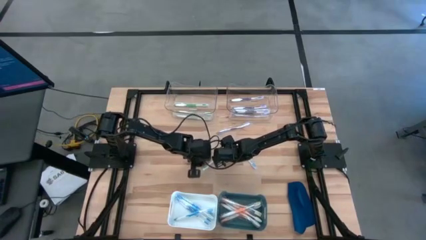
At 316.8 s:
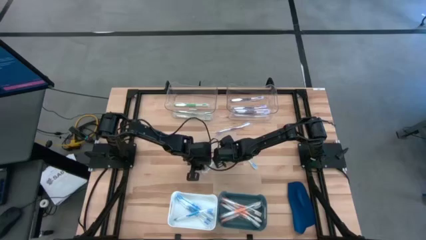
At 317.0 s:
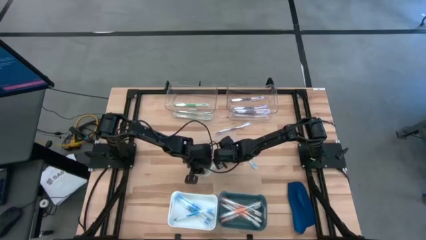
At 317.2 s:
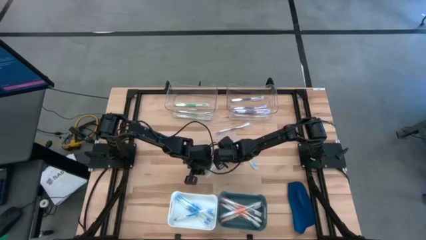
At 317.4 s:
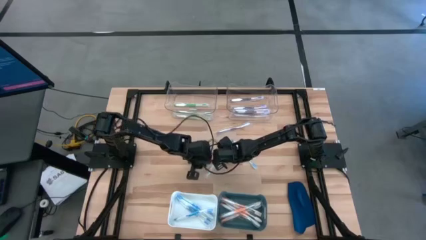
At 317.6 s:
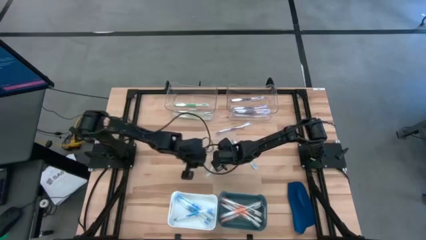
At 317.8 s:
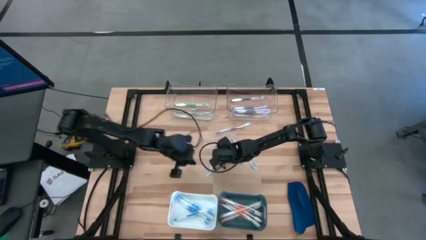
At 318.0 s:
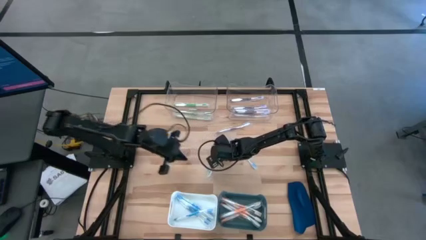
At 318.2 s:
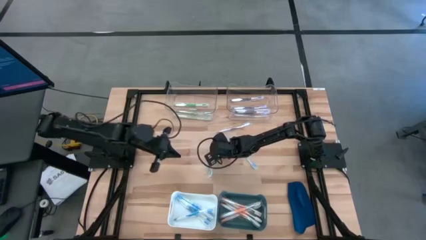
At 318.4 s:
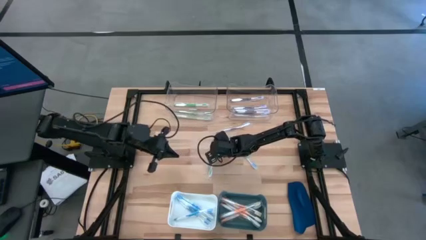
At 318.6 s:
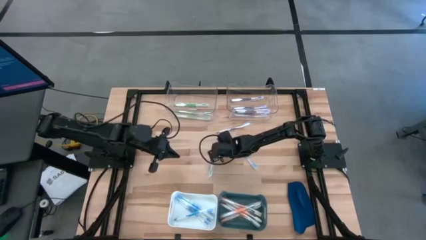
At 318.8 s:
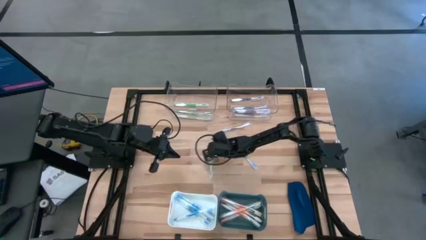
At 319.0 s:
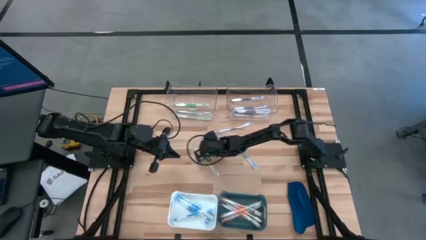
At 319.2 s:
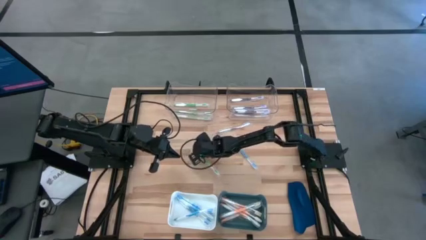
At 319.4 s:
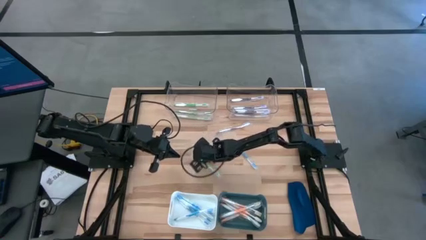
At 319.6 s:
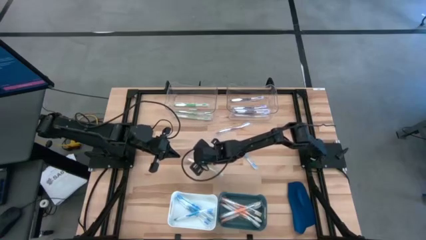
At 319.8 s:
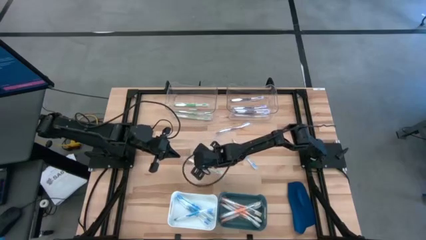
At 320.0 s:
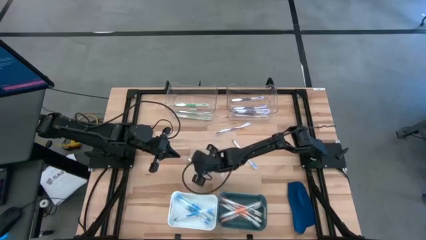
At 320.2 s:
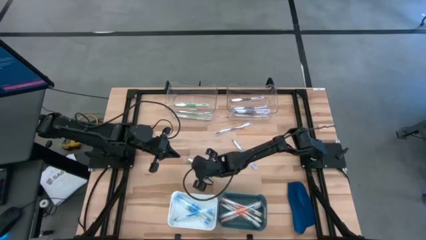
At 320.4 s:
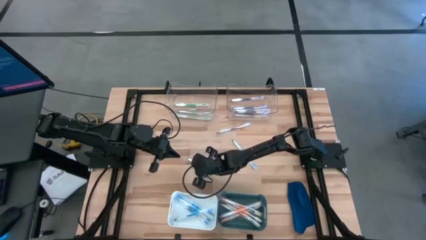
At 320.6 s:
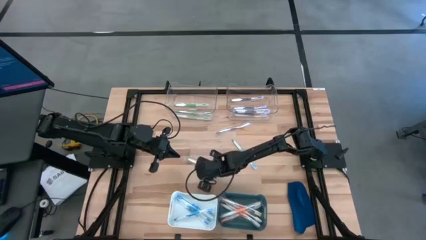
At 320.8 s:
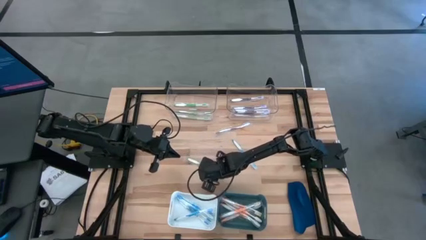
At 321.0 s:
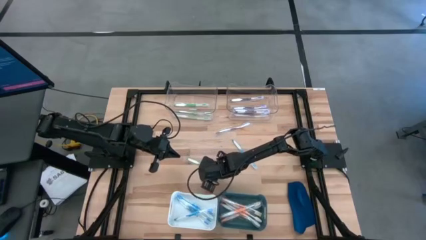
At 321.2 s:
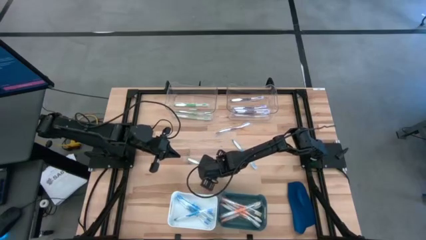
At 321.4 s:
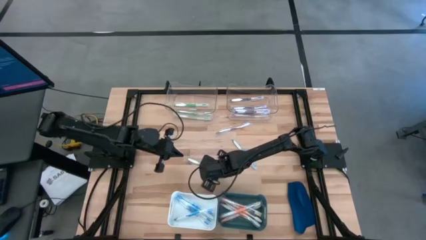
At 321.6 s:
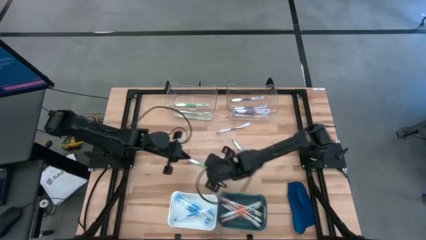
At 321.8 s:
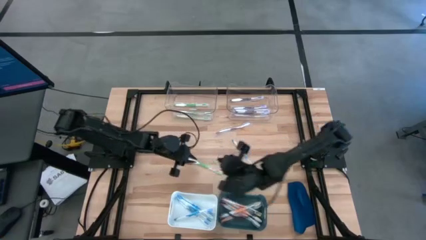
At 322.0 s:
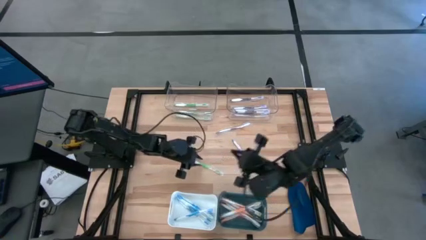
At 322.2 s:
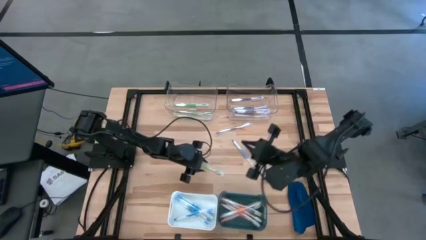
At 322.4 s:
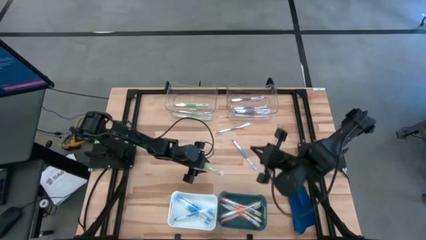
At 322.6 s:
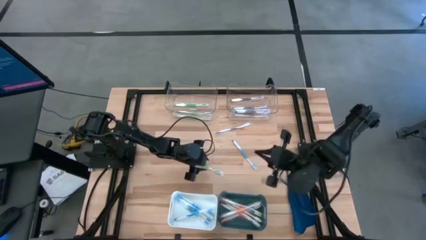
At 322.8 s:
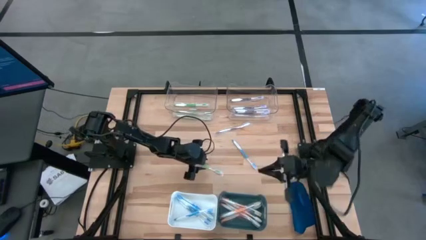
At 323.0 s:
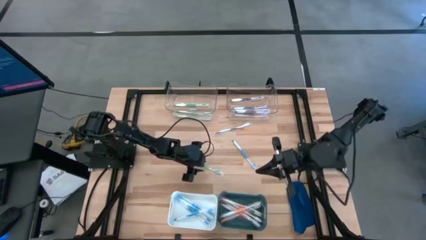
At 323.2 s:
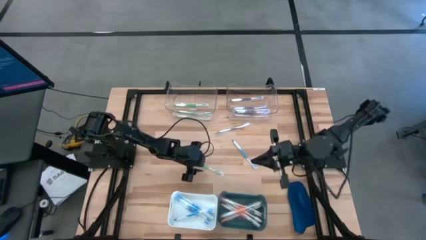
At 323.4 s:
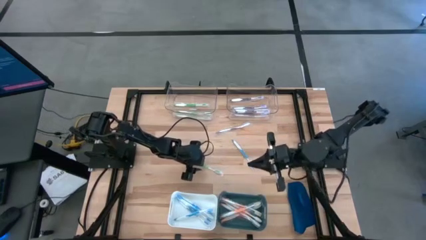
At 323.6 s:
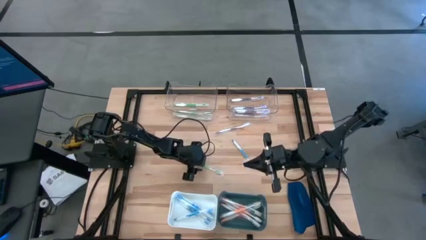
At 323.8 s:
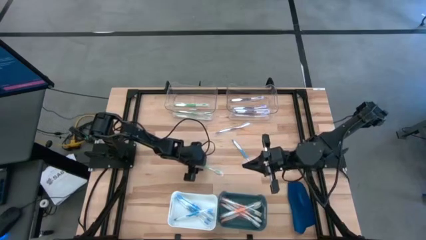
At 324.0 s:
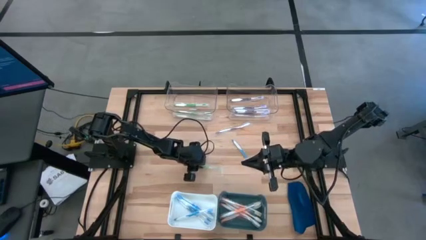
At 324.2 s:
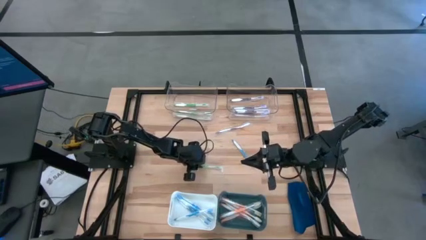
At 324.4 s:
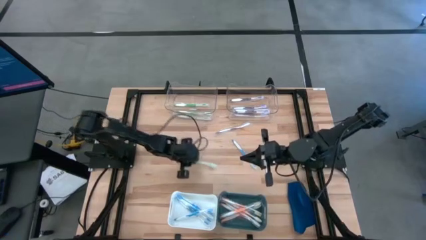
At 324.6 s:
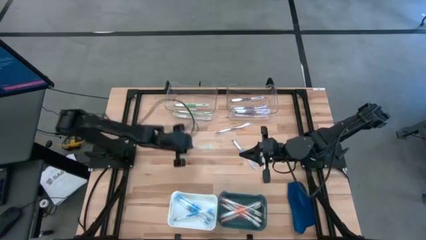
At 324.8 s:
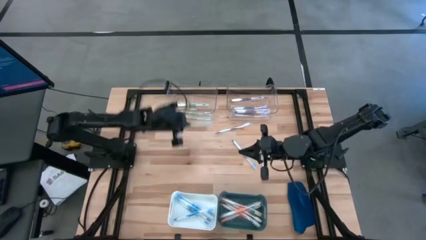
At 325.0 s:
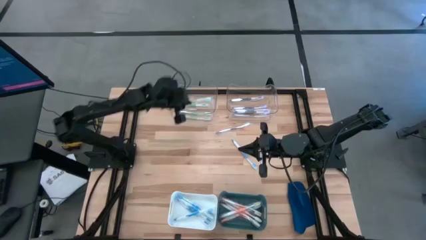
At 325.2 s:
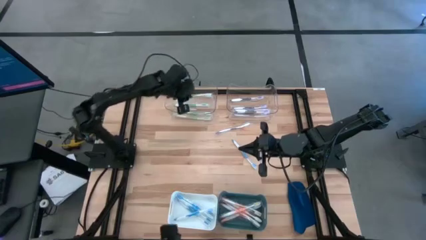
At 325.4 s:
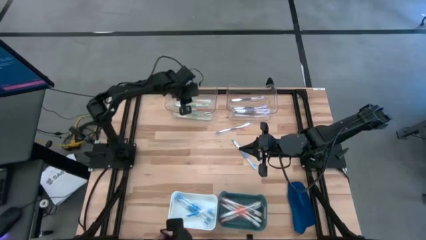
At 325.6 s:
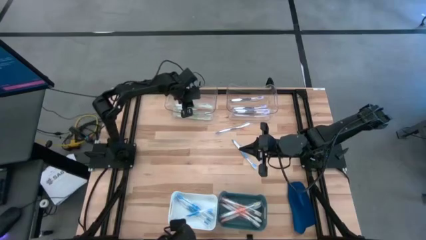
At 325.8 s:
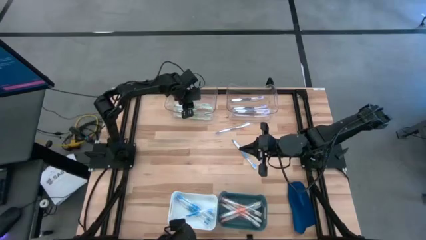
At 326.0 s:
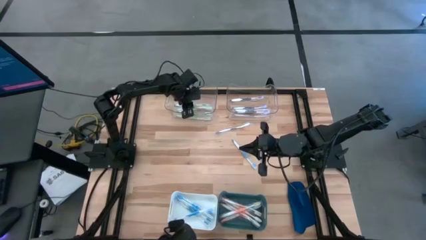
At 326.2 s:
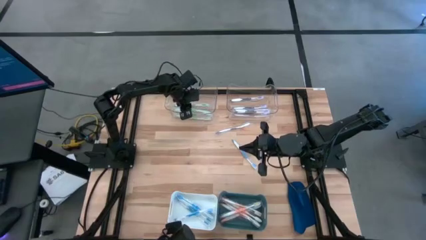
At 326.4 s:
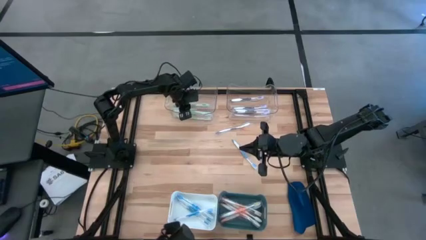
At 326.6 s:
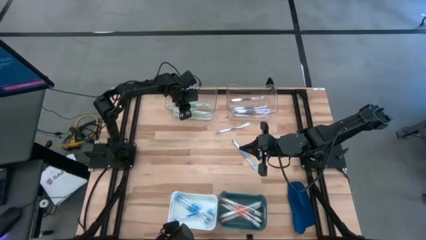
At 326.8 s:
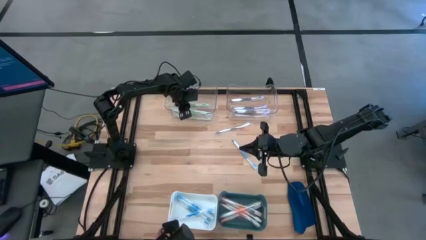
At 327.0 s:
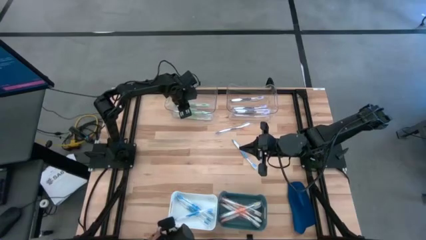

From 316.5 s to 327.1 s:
Task: Pick & Place Toothbrushes
Put the green toothbrush into the left transparent bin

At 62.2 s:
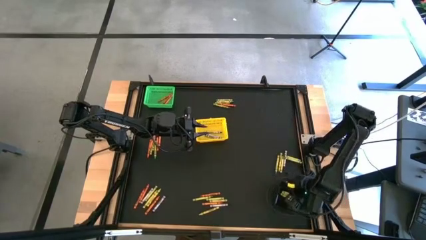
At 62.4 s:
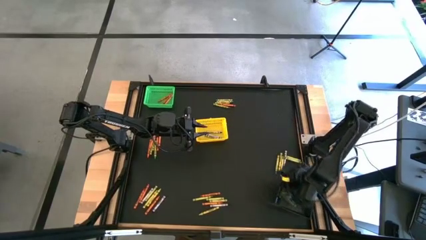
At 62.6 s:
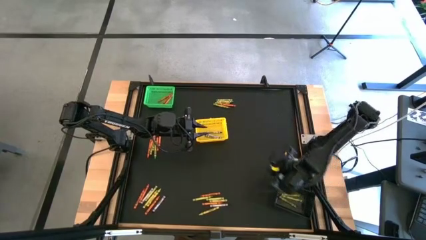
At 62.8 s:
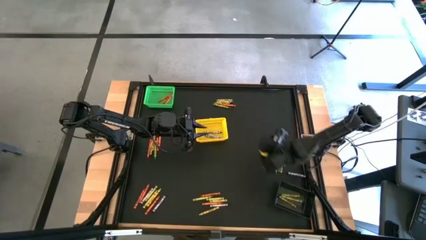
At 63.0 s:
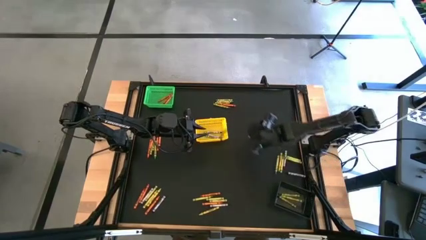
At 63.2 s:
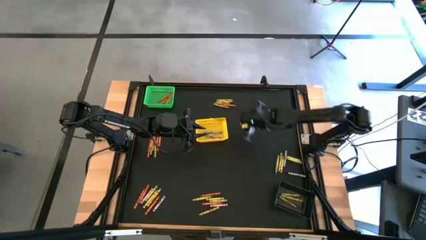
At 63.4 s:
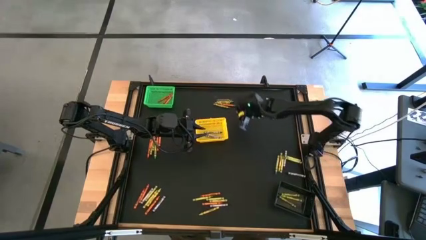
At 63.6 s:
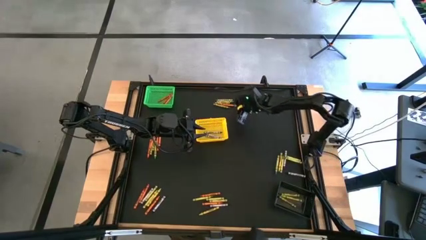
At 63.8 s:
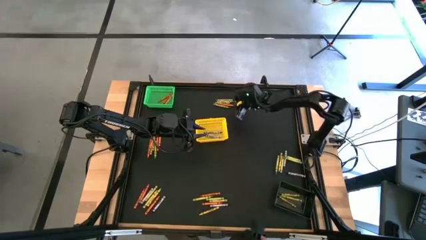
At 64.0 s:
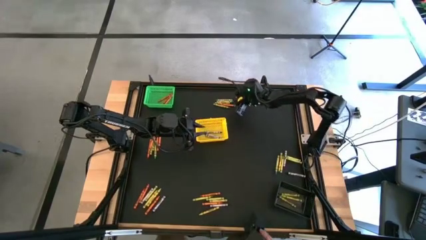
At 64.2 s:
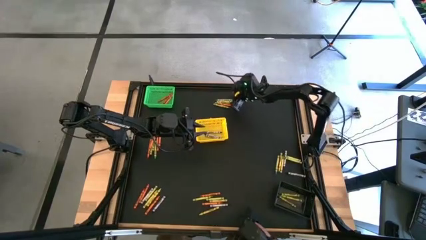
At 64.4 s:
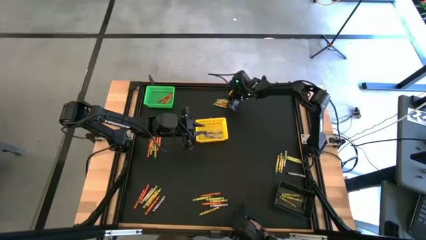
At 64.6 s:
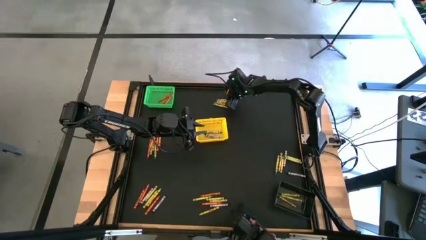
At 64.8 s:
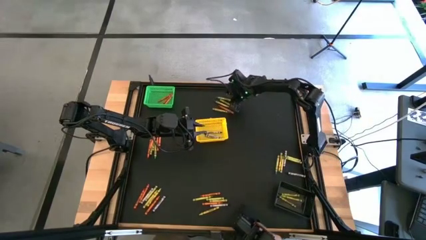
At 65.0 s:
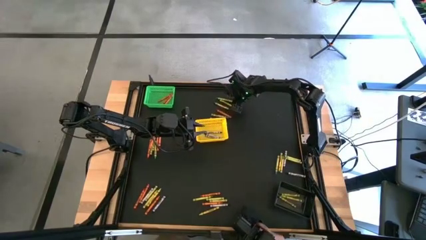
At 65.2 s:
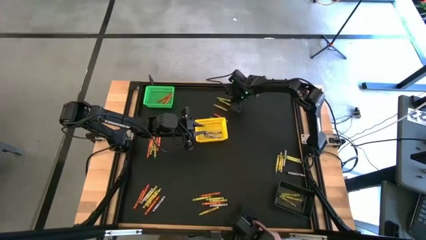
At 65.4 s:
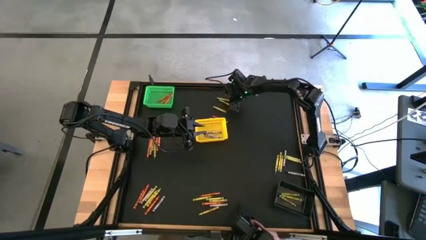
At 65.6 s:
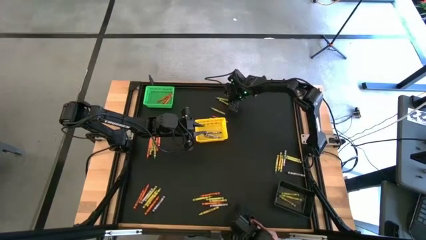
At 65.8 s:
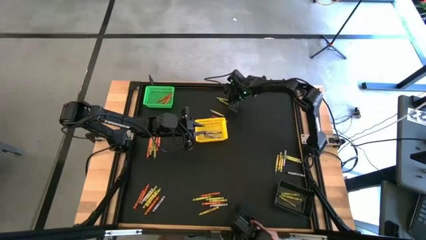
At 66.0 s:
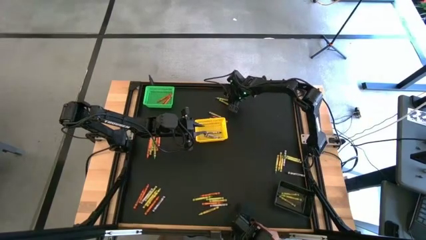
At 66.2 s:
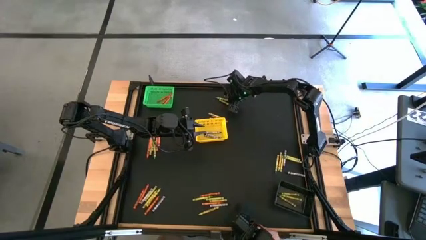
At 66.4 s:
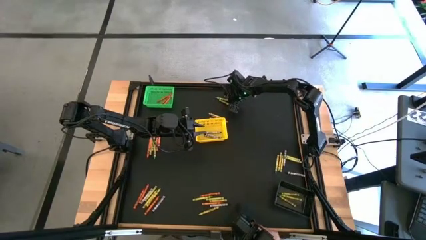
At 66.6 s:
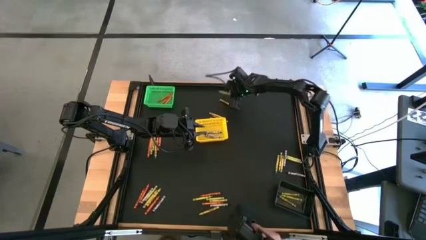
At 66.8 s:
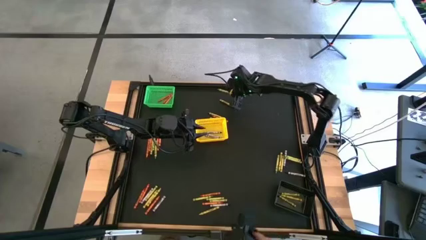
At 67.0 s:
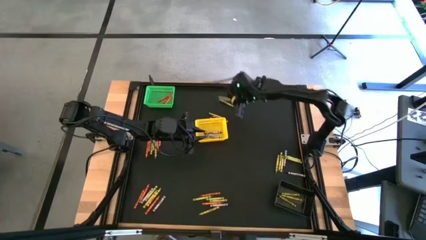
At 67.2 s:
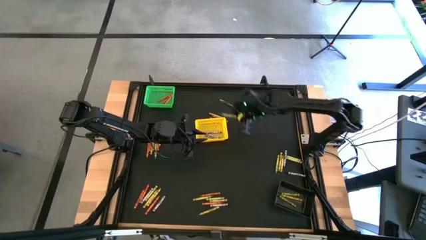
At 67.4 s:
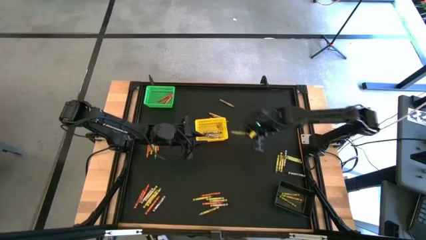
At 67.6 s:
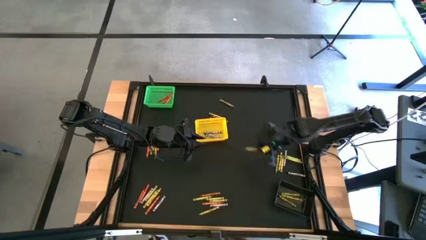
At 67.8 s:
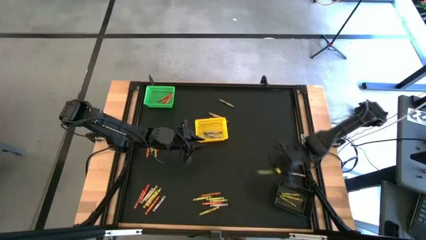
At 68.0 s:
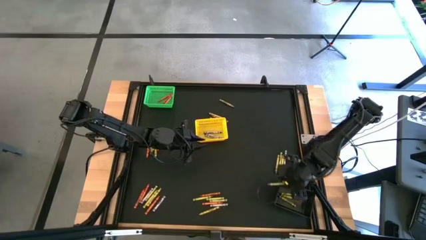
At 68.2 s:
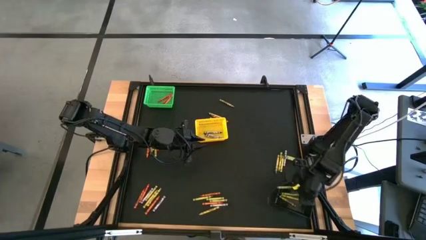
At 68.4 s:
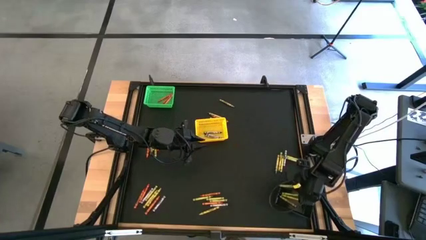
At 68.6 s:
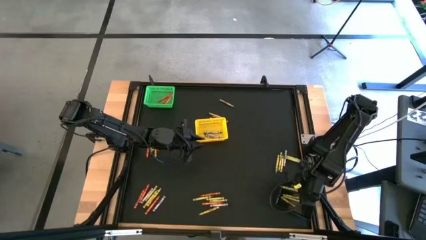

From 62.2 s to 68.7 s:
Task: Sort crayons
Put the green crayon into the black bin
